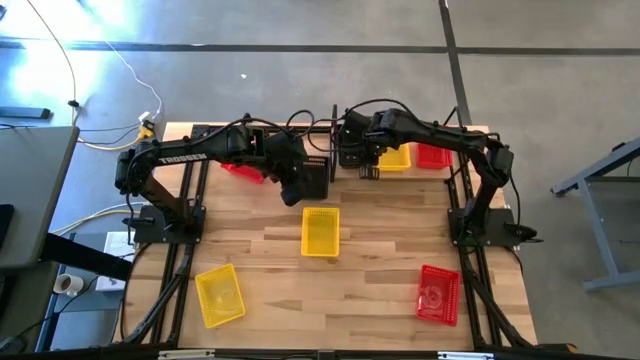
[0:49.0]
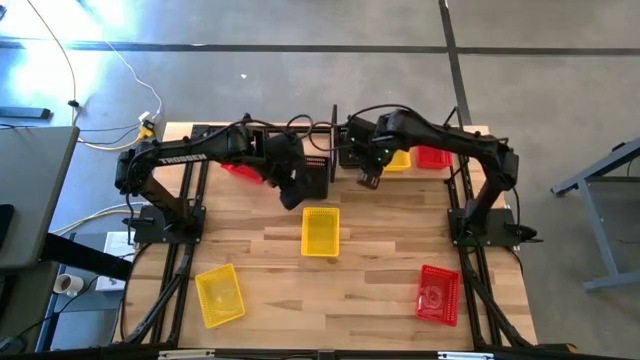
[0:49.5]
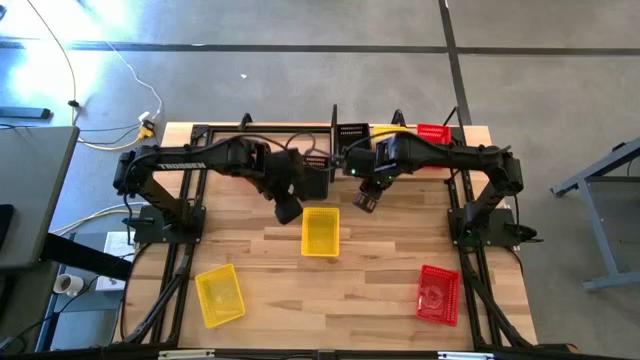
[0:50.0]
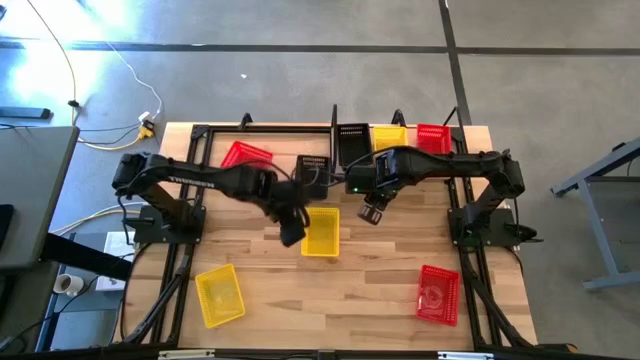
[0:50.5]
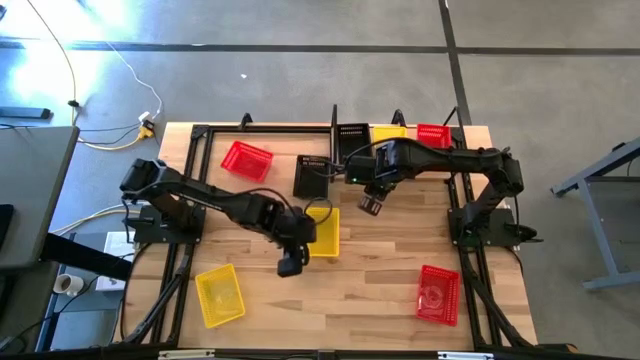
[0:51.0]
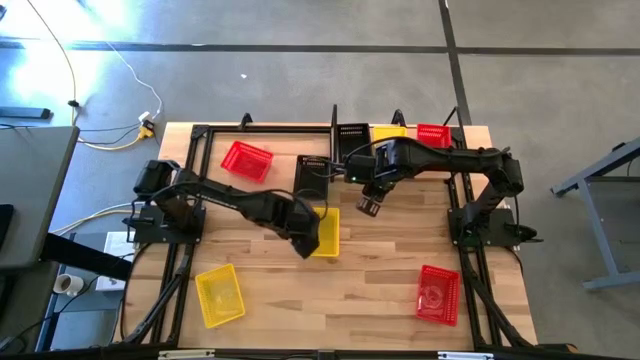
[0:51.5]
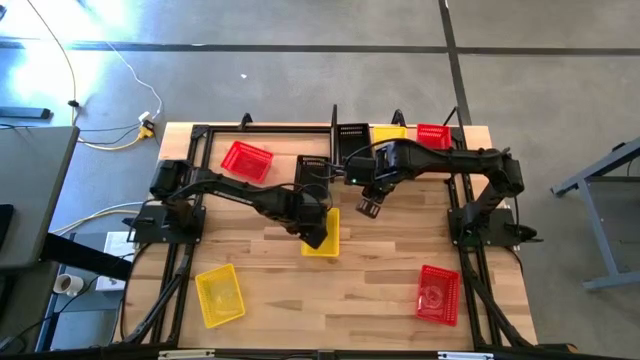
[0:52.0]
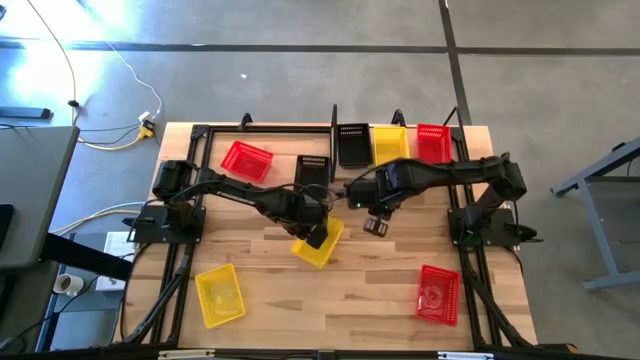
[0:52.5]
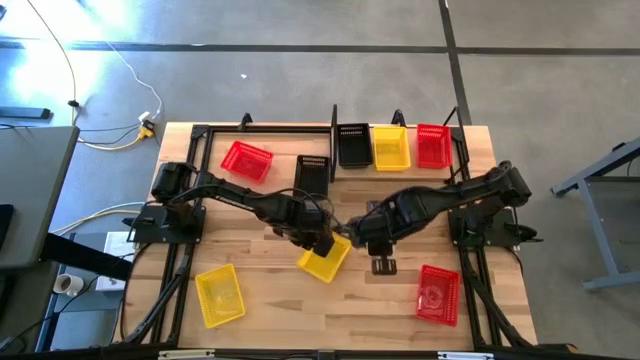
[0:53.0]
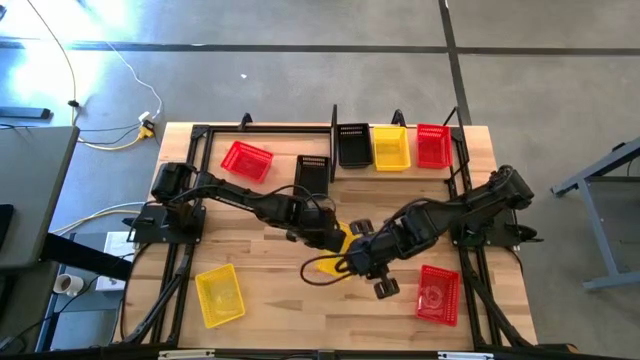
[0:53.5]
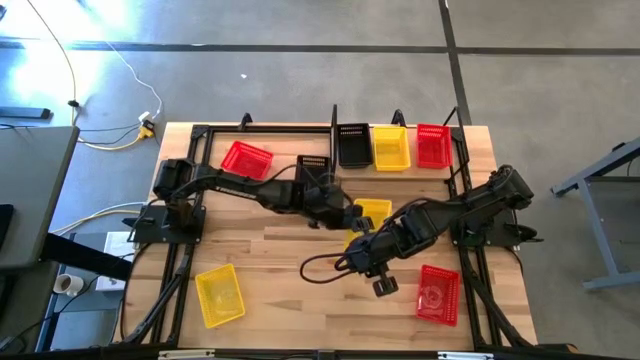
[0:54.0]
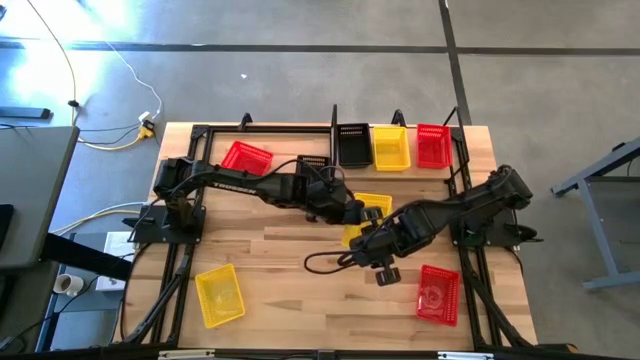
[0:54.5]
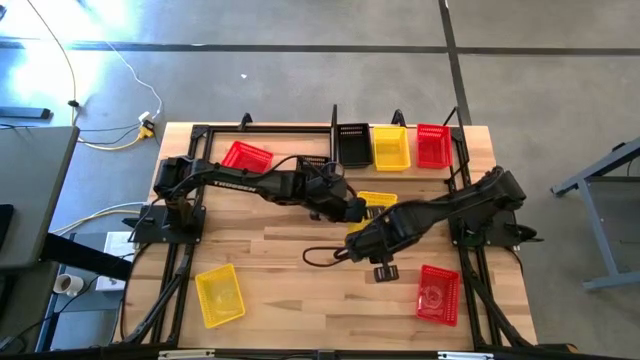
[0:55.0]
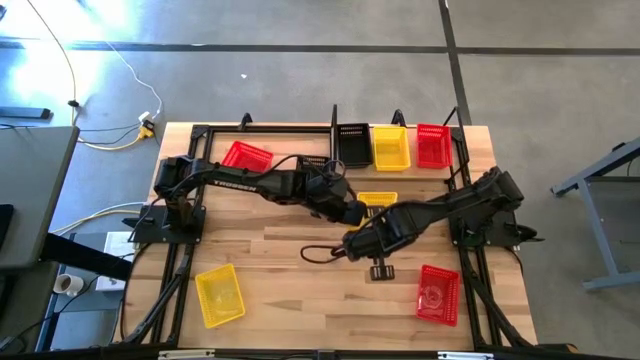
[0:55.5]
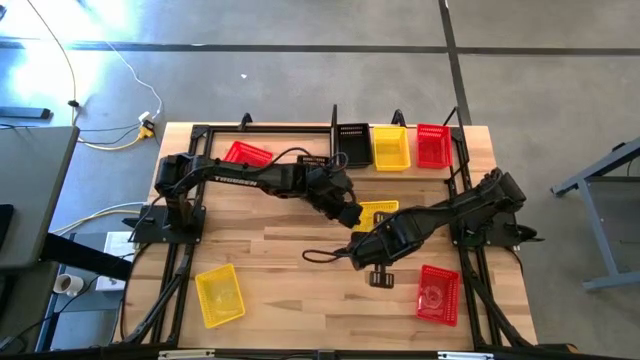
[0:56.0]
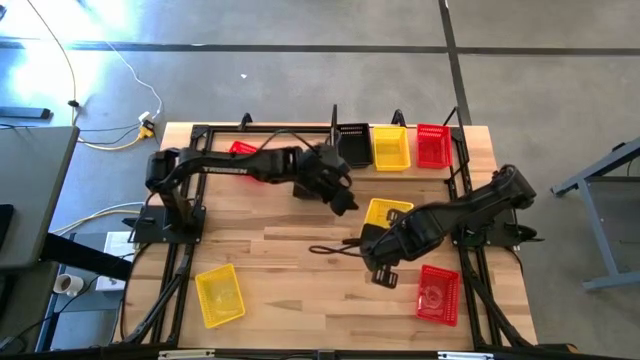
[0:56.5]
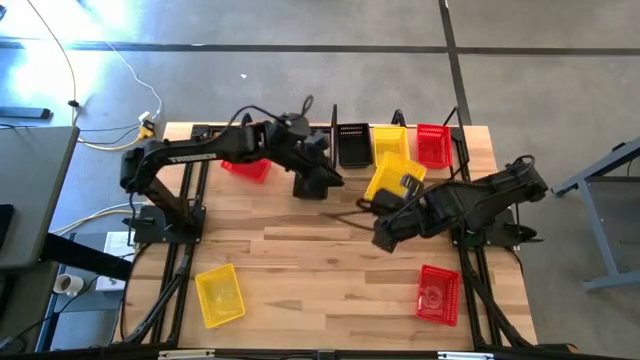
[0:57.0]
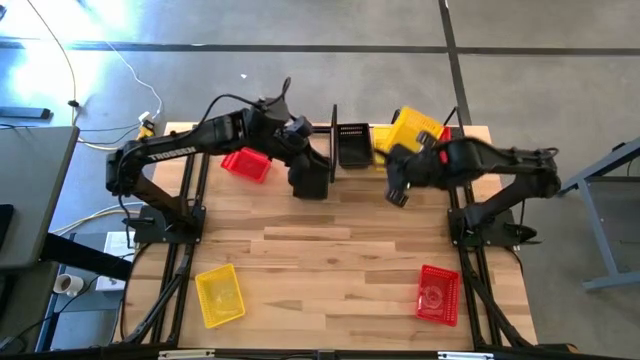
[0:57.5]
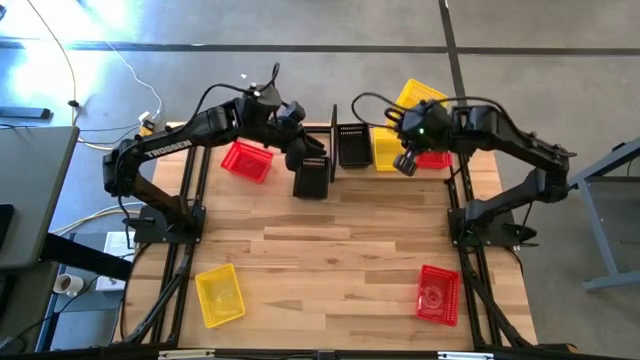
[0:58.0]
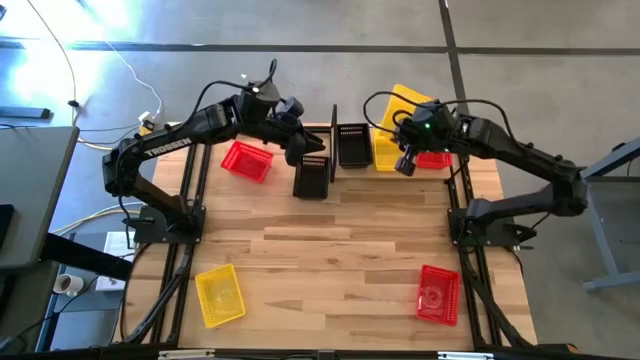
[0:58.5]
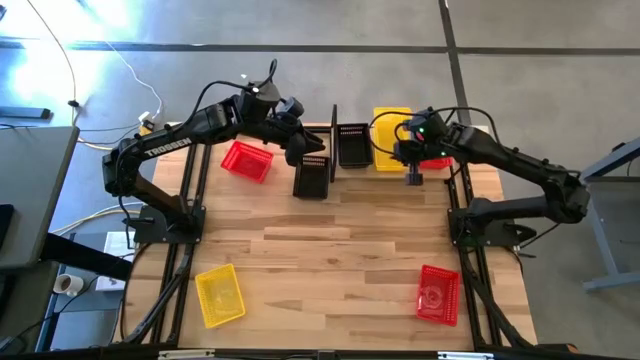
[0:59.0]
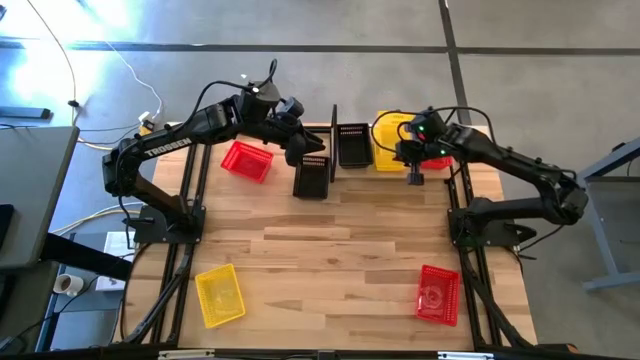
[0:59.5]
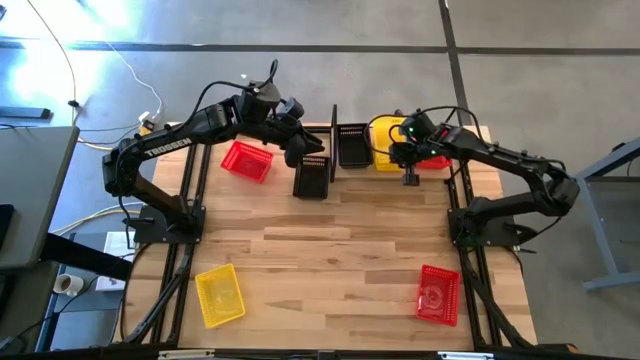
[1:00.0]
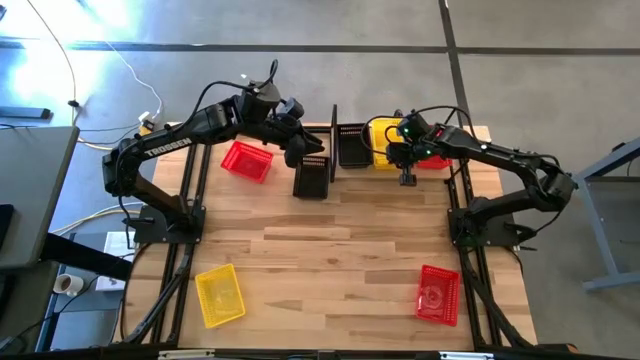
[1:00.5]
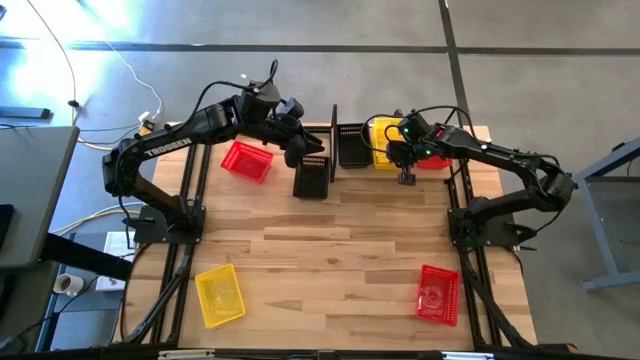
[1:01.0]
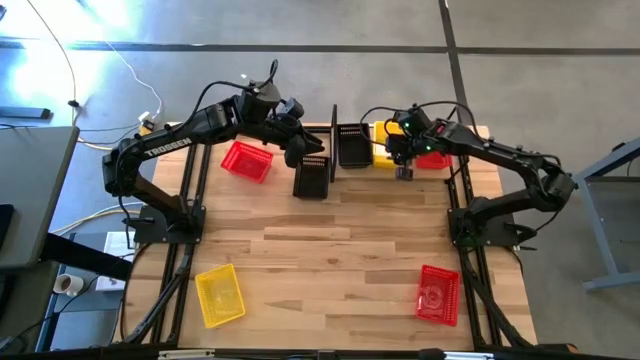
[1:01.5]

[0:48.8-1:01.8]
Task: Stack baskets on shelf by color
Stack the top yellow basket on the yellow basket on the shelf

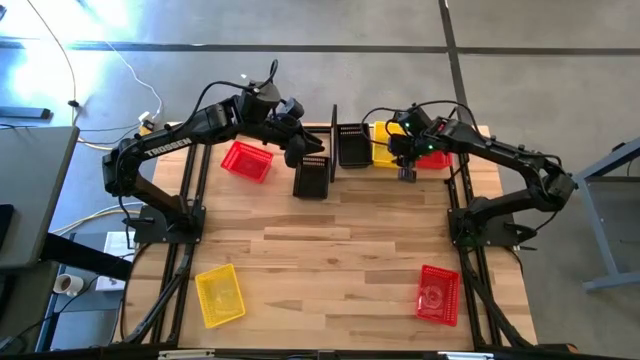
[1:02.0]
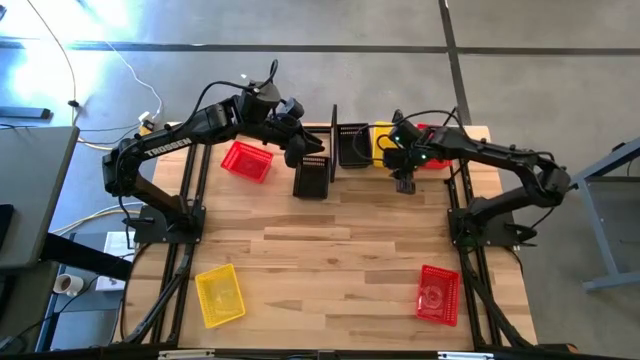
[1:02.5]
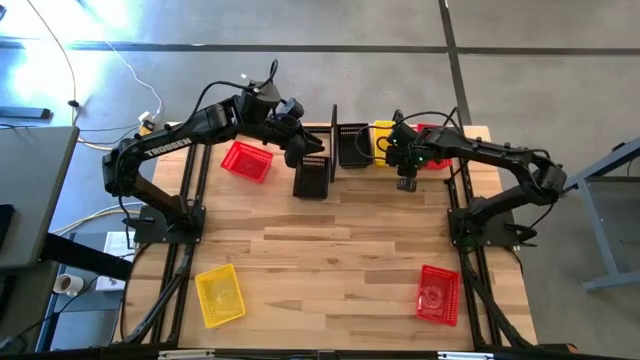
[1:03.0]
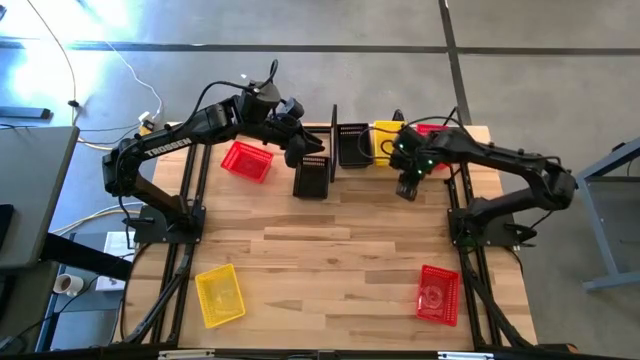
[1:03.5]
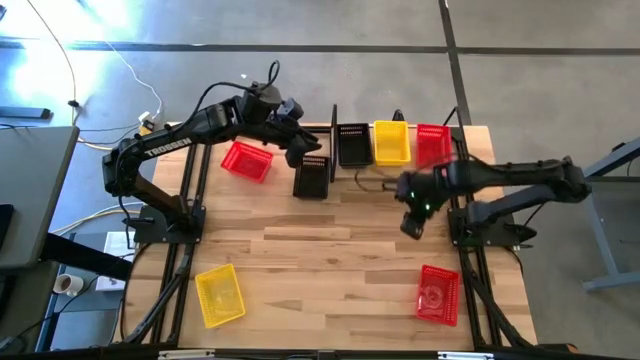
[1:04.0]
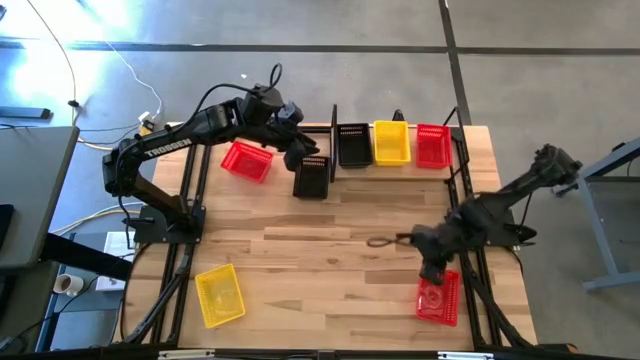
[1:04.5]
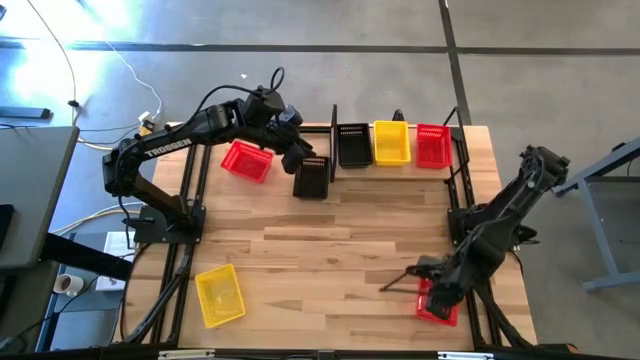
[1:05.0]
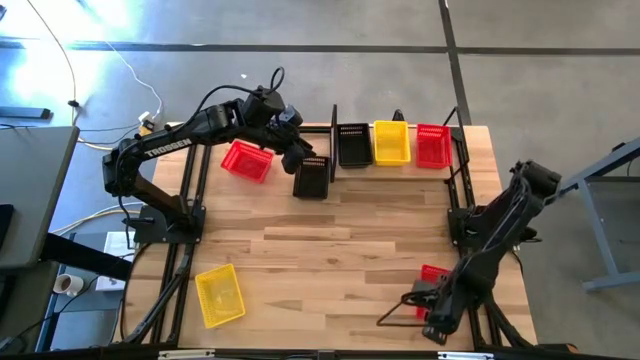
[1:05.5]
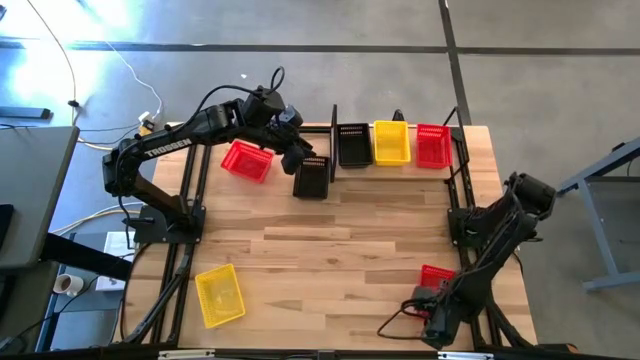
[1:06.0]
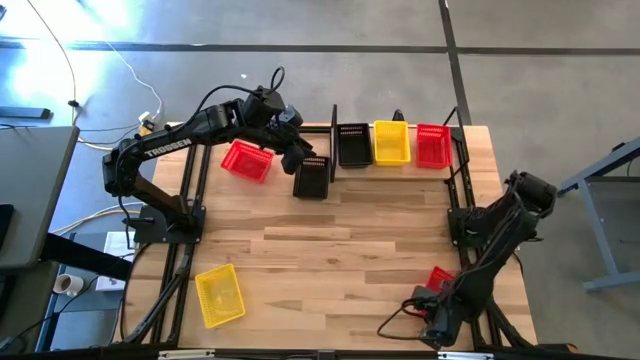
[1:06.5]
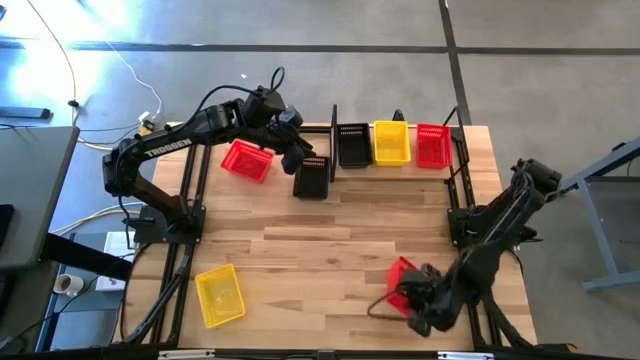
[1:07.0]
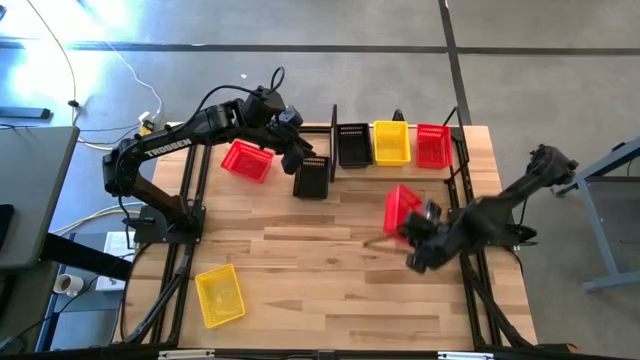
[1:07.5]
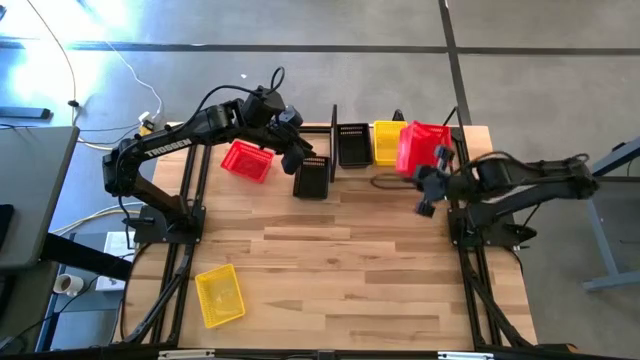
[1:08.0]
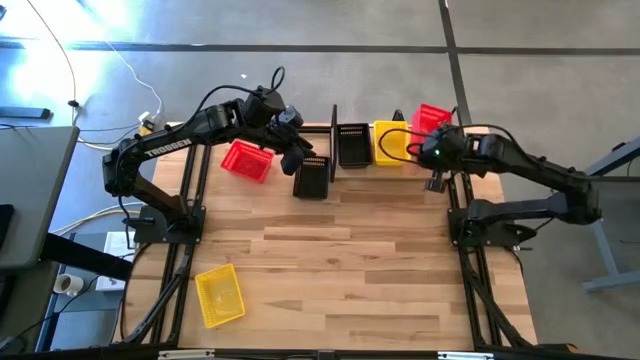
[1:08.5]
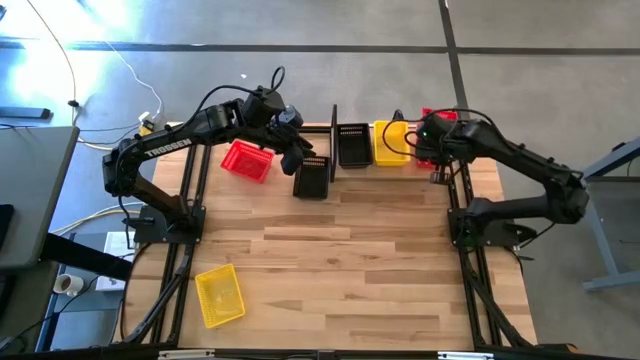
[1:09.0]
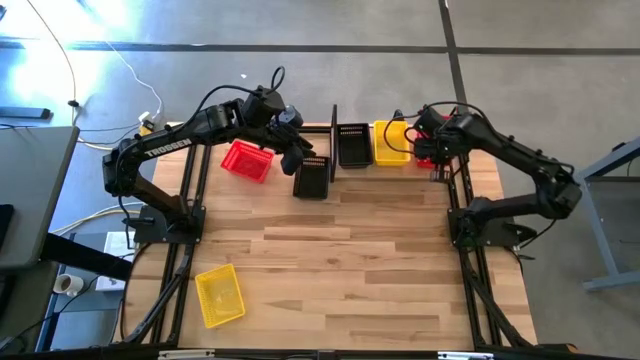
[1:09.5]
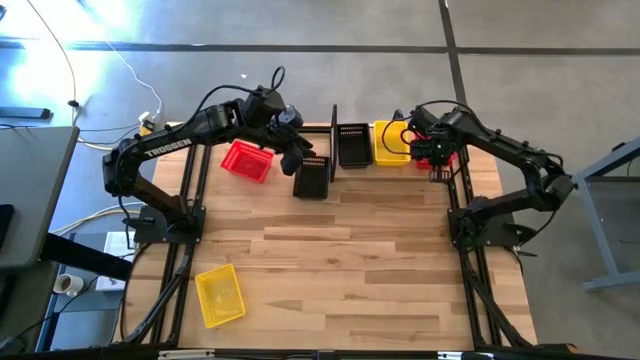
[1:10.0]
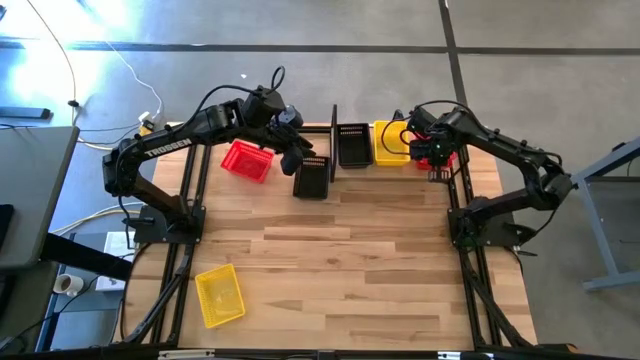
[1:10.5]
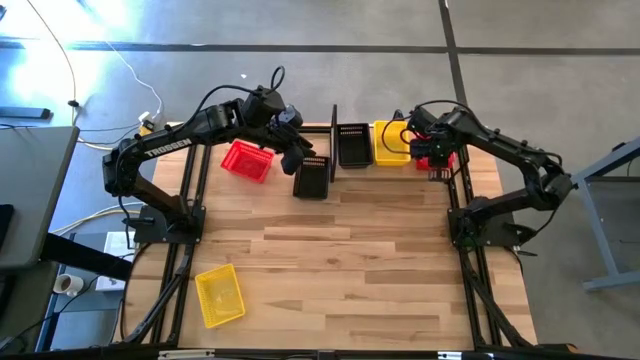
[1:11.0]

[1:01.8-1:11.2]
Stack the bottom red basket on the red basket on the shelf
